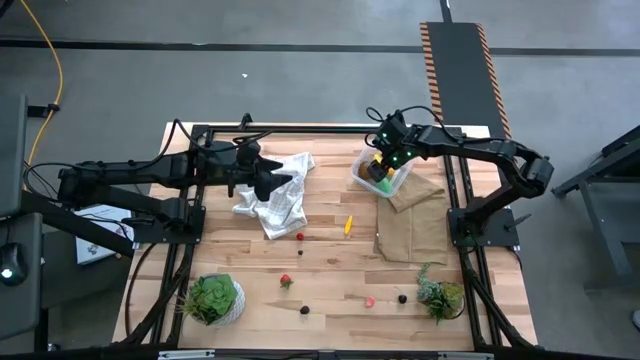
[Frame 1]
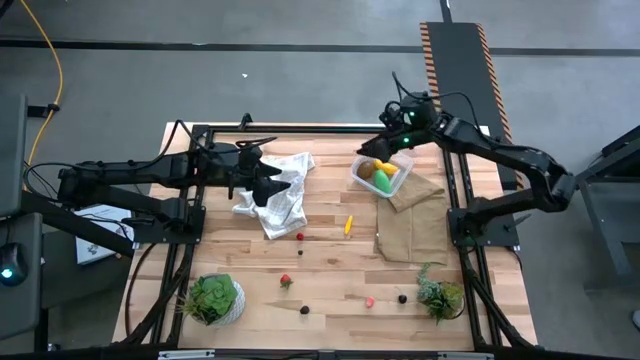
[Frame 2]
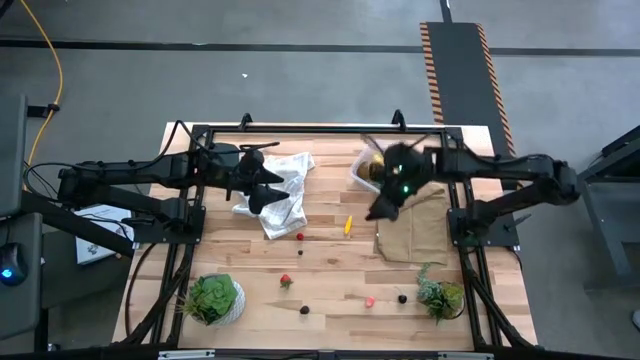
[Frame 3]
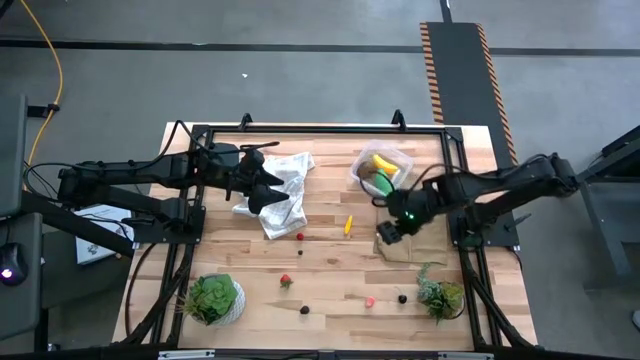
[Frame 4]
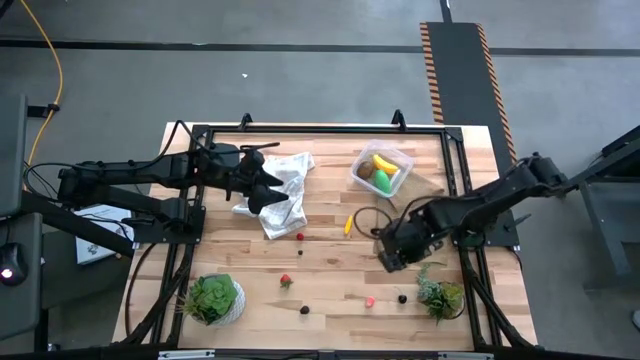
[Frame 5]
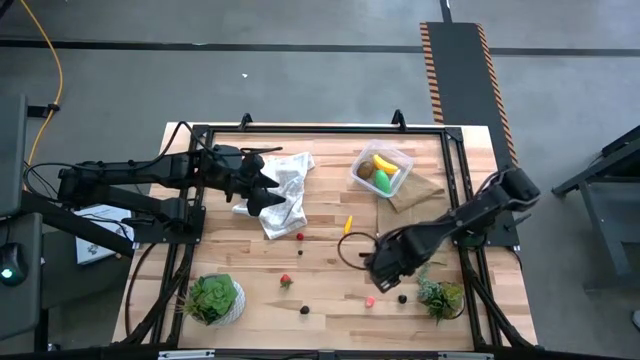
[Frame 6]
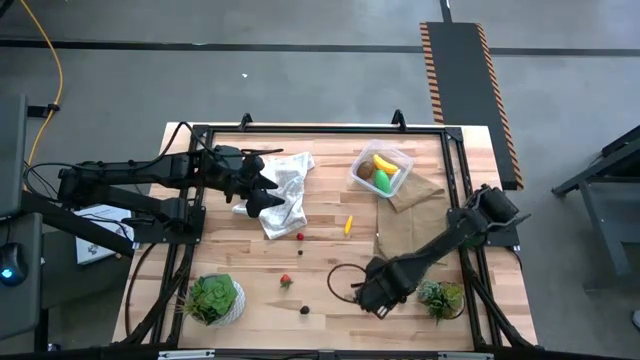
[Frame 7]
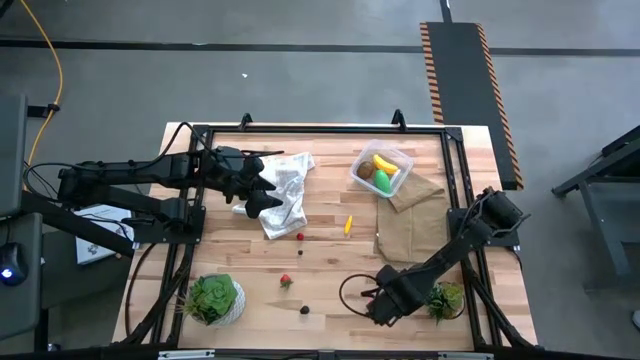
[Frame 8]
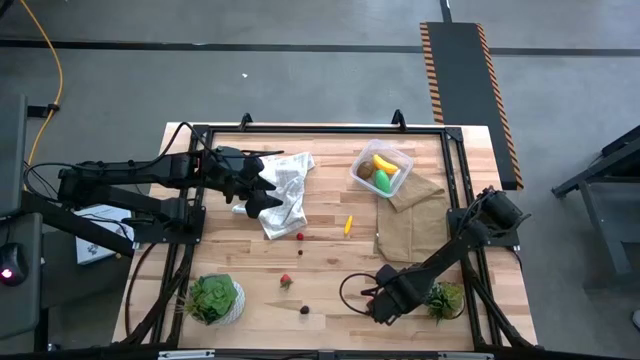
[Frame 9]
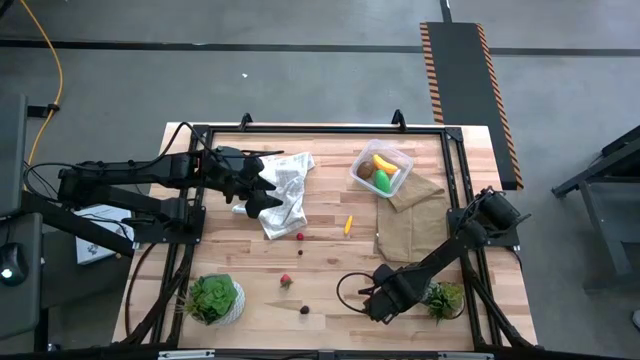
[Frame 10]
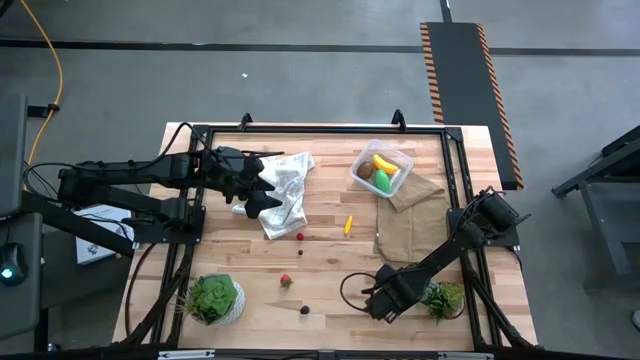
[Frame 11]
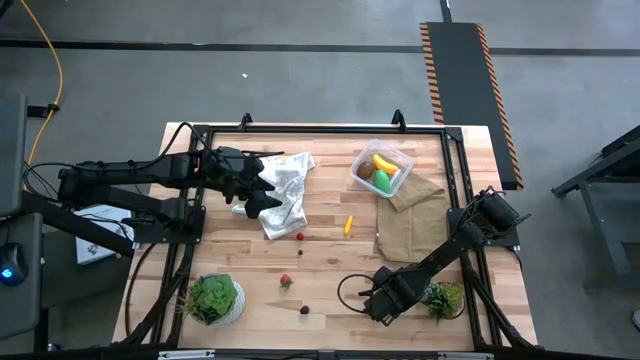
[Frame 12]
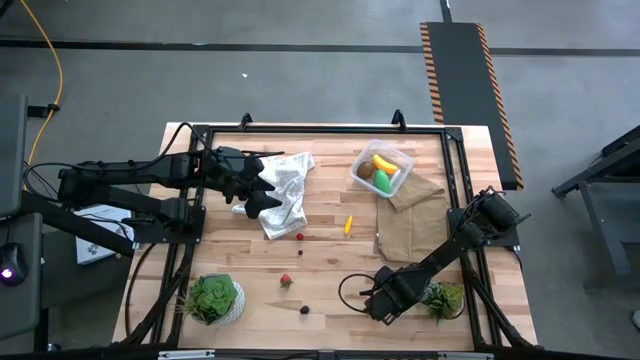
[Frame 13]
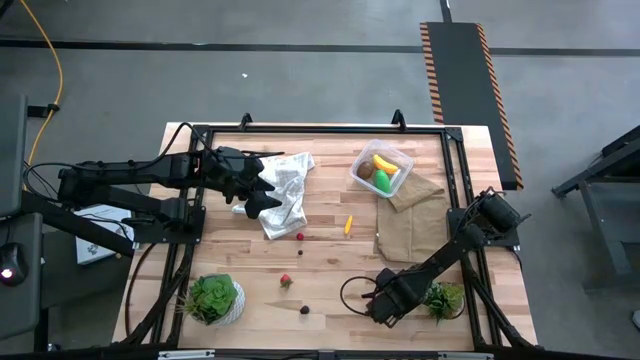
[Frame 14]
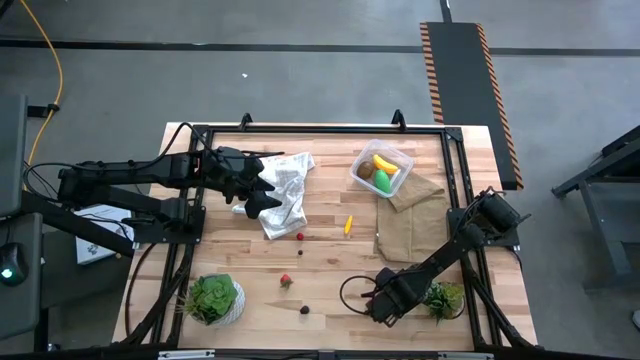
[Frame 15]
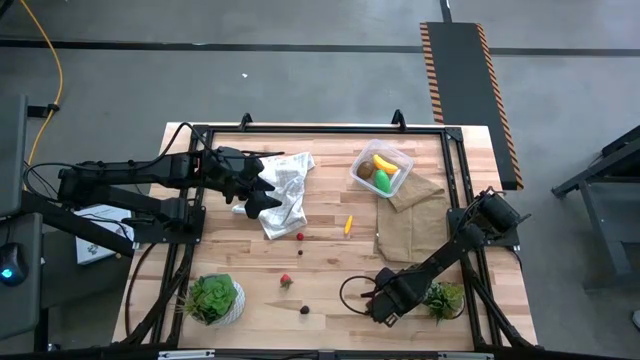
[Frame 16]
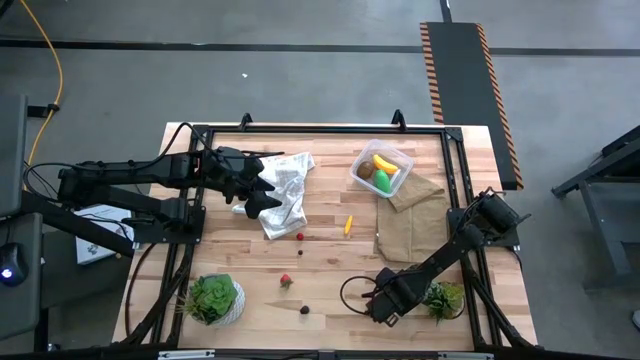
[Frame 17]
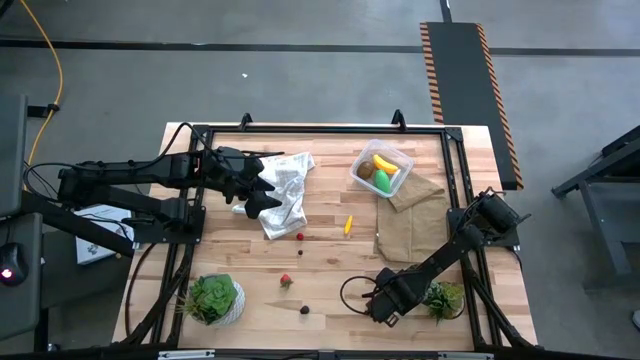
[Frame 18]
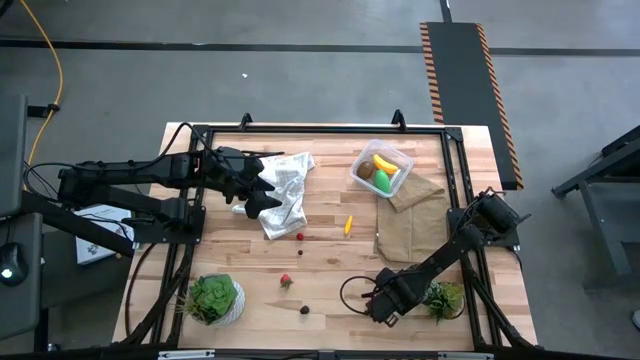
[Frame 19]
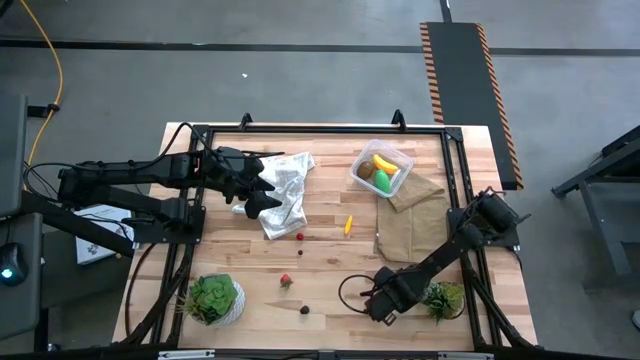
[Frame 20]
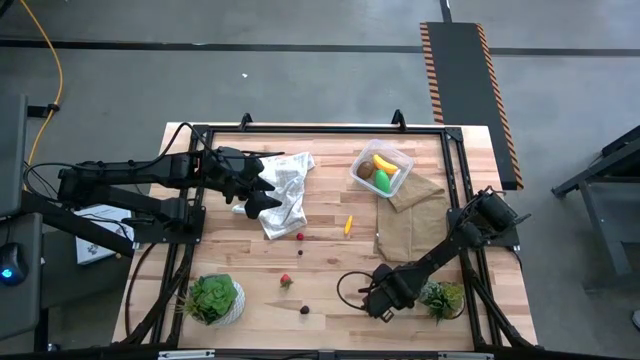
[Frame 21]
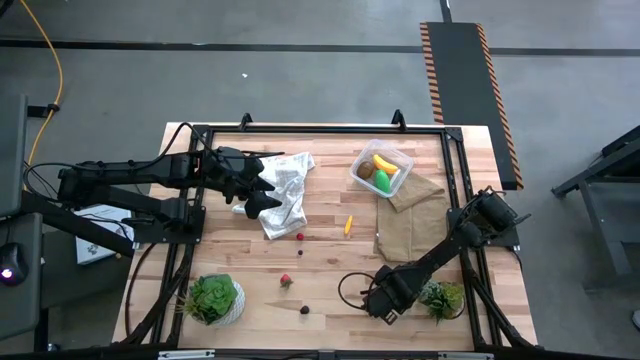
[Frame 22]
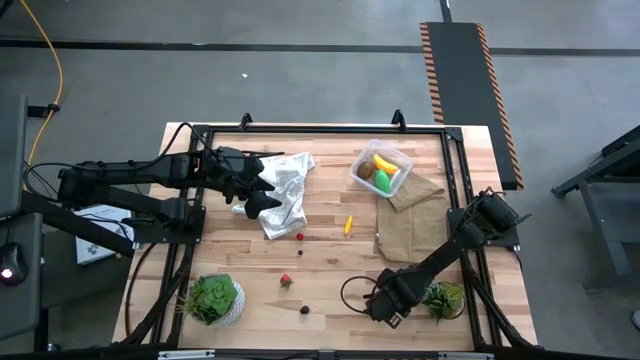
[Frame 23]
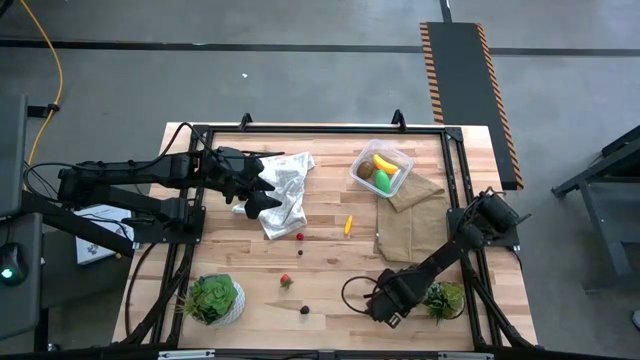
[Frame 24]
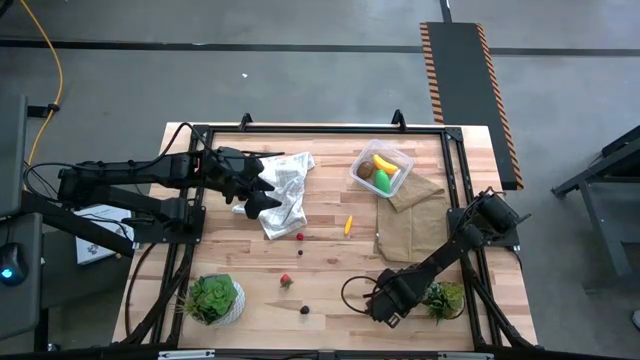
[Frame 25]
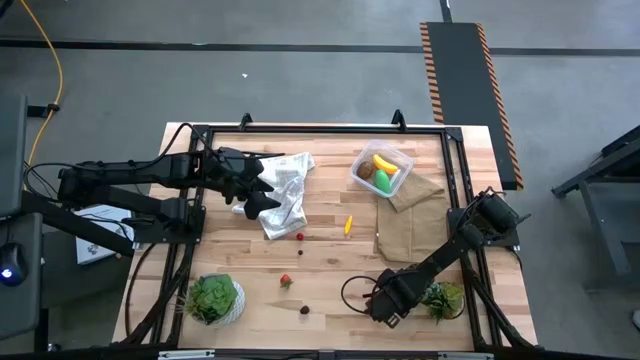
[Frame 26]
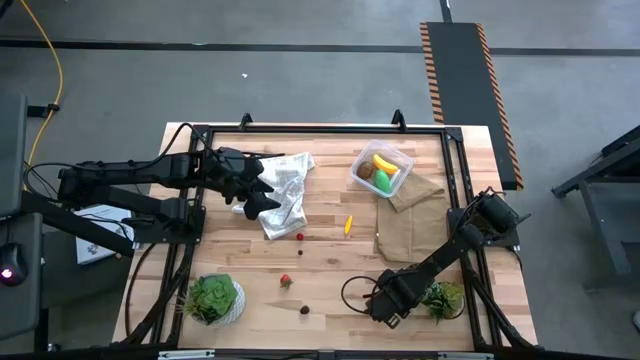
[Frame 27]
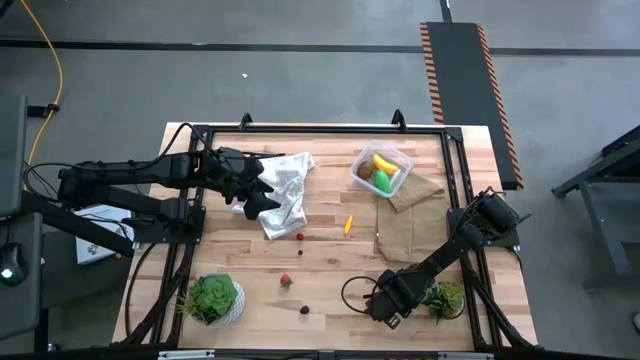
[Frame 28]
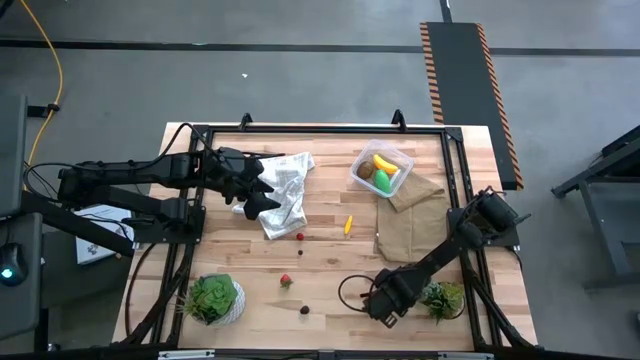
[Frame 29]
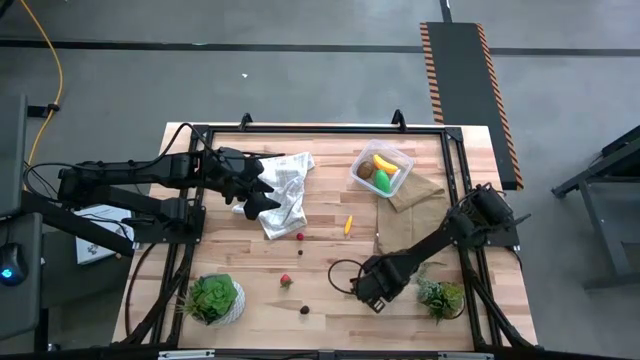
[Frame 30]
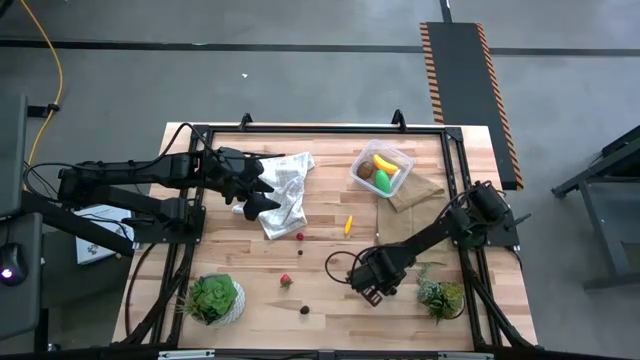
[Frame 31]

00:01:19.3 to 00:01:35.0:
Task: Pick and placing Produce into tupperware
Put the black cherry into the transparent bin

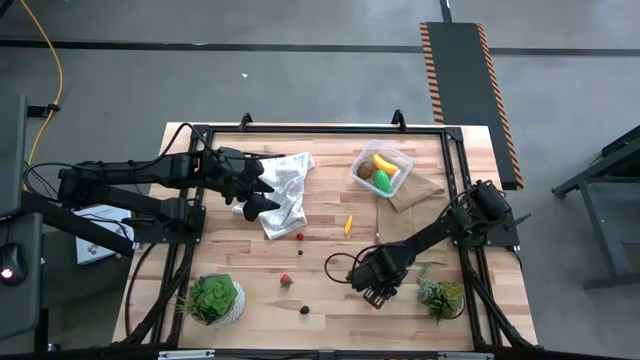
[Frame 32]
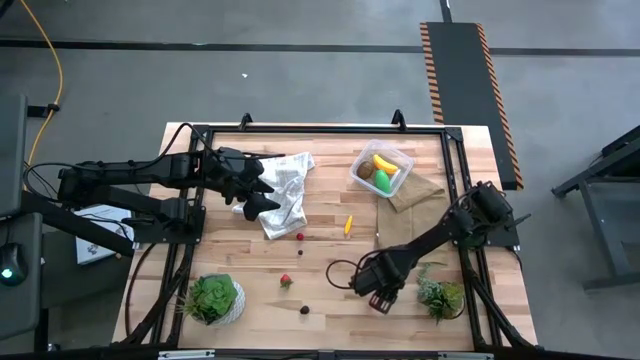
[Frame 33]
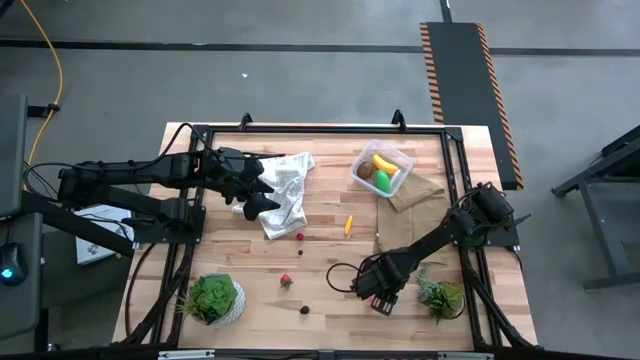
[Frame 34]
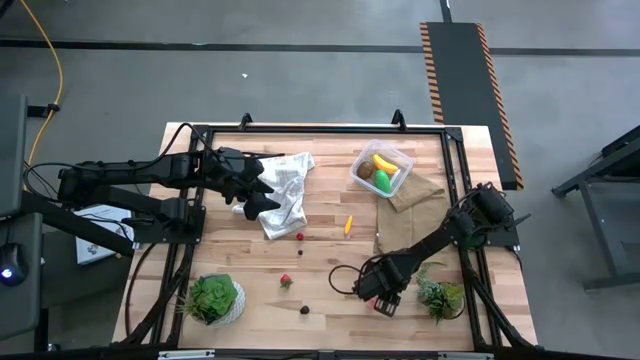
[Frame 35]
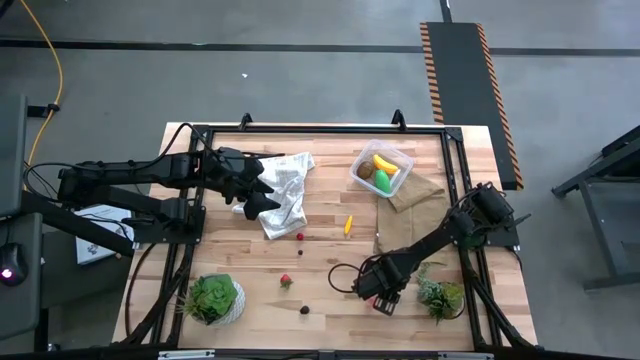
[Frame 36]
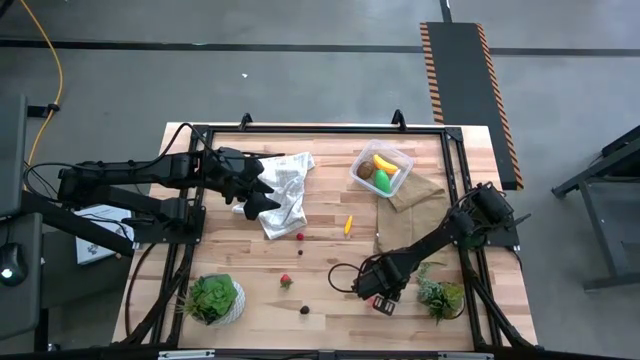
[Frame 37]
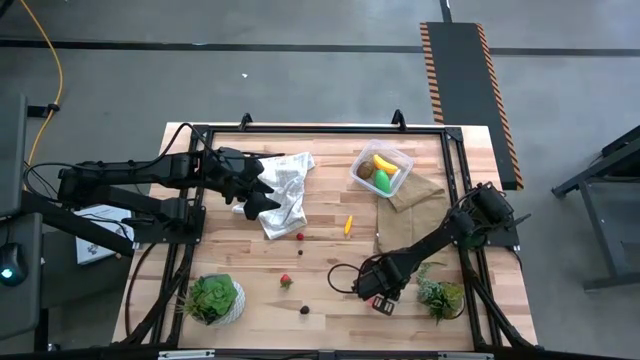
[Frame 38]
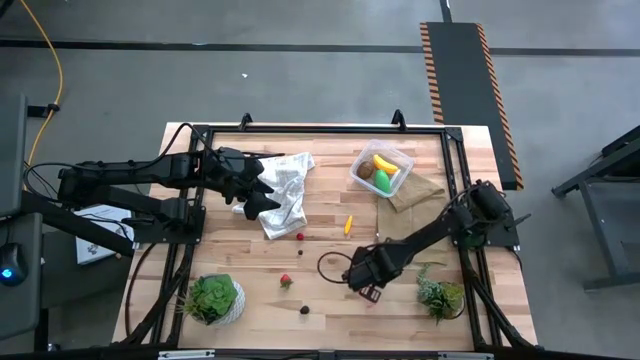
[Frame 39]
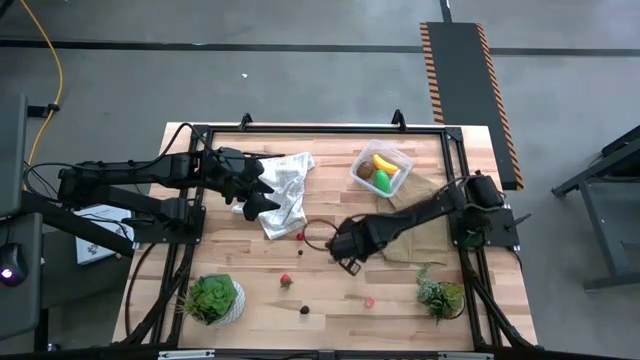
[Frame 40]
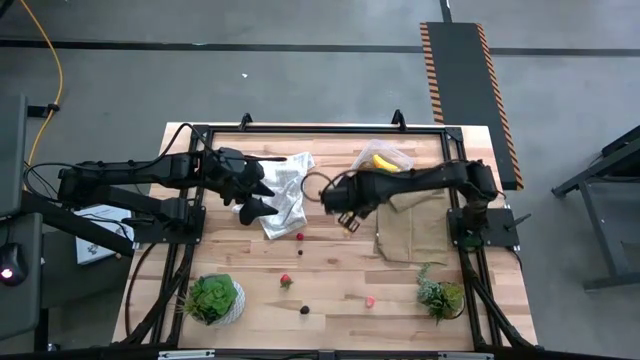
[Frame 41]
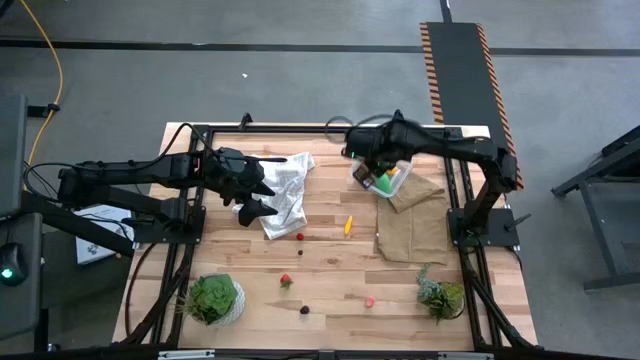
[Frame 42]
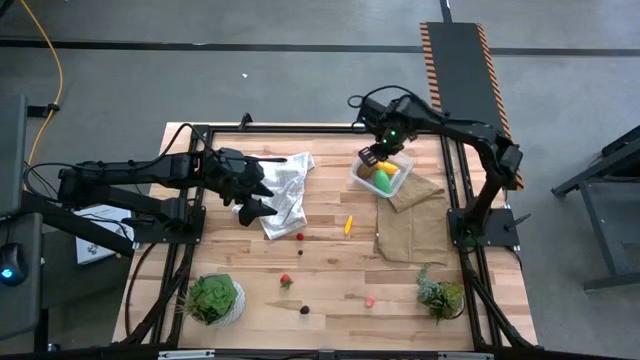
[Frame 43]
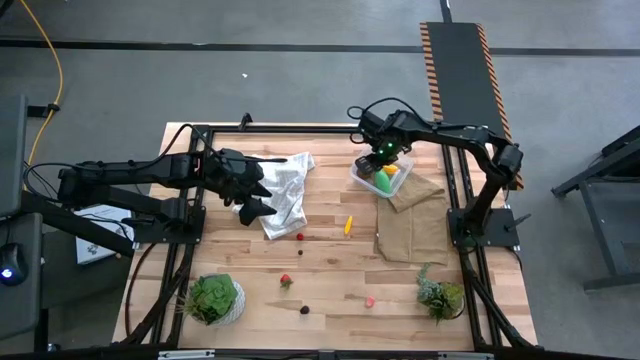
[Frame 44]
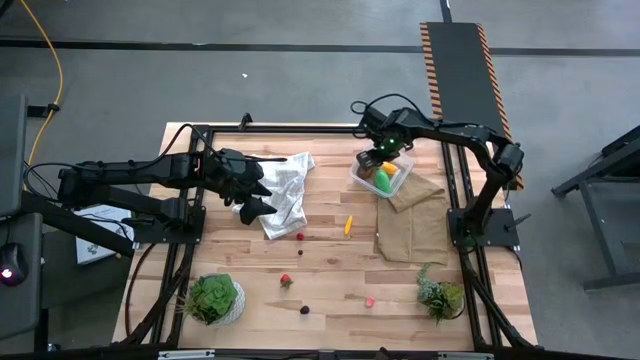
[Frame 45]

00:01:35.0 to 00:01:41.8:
Put the black cherry into the transparent bin
